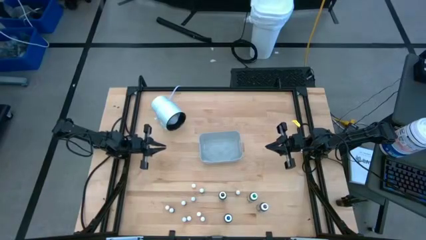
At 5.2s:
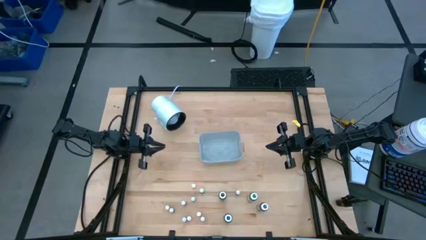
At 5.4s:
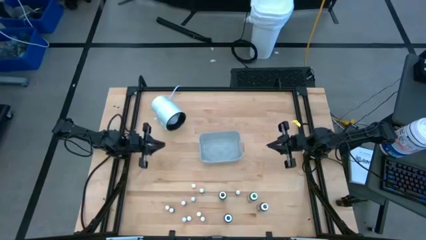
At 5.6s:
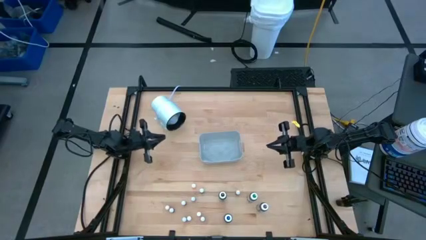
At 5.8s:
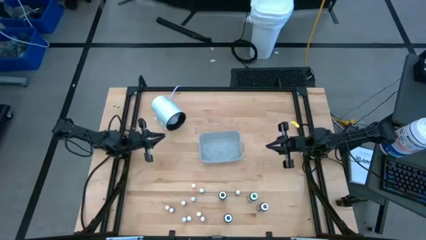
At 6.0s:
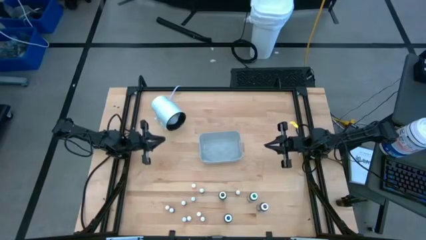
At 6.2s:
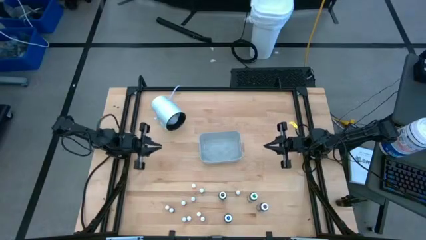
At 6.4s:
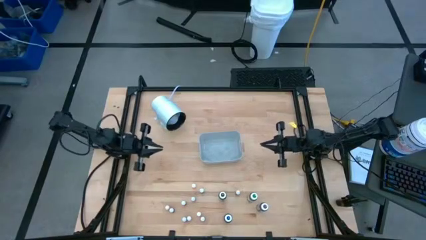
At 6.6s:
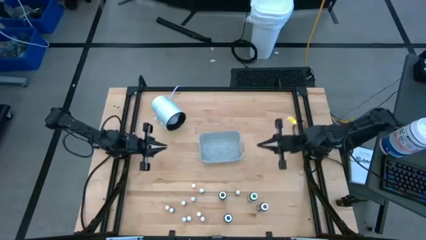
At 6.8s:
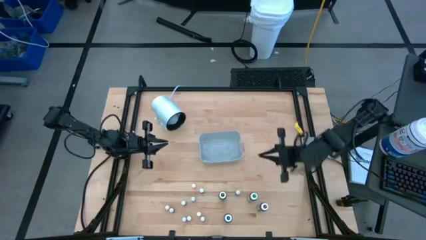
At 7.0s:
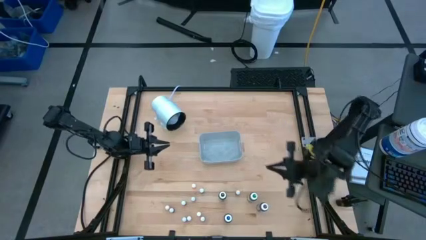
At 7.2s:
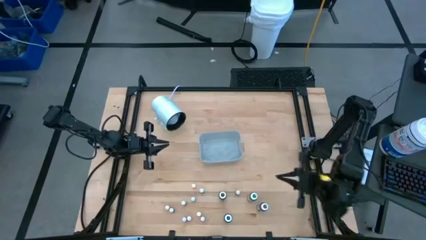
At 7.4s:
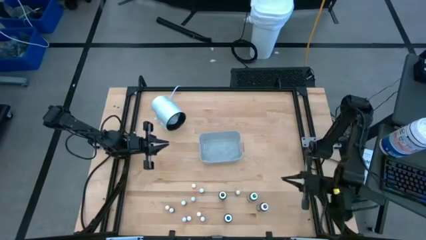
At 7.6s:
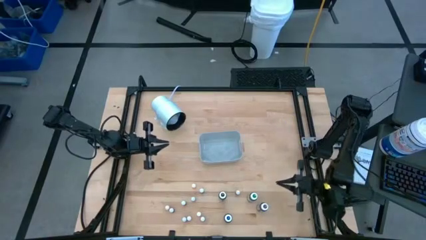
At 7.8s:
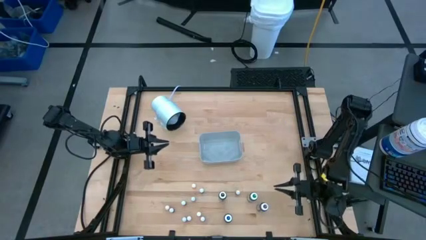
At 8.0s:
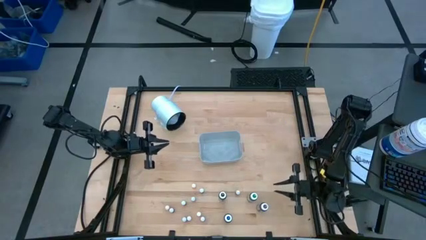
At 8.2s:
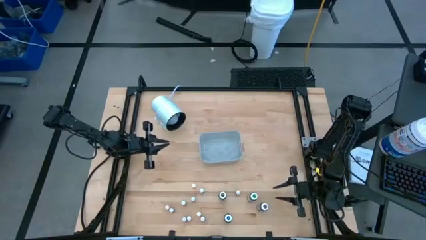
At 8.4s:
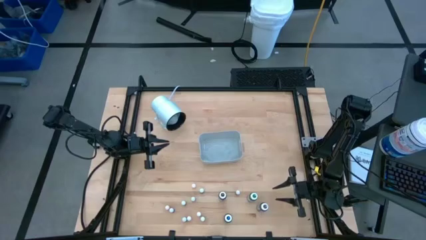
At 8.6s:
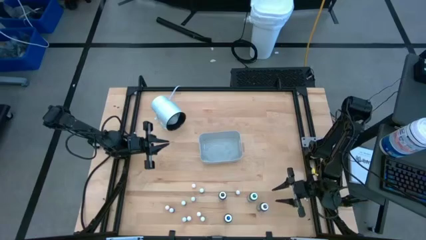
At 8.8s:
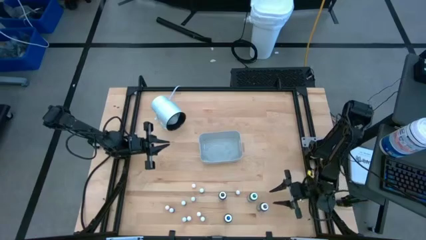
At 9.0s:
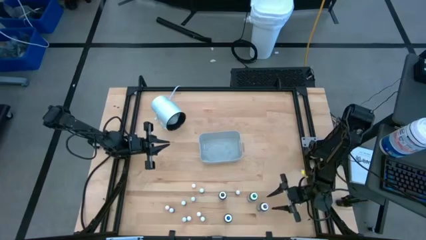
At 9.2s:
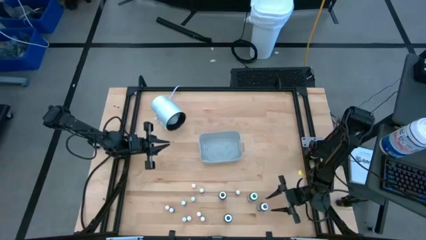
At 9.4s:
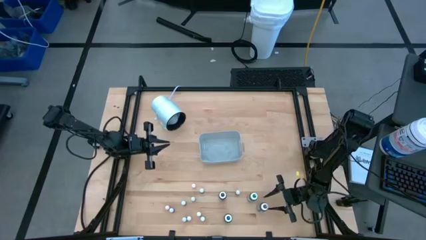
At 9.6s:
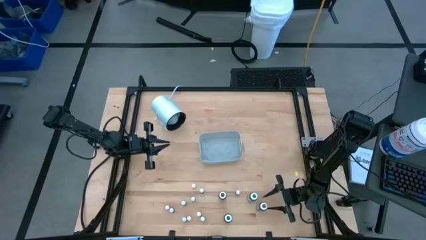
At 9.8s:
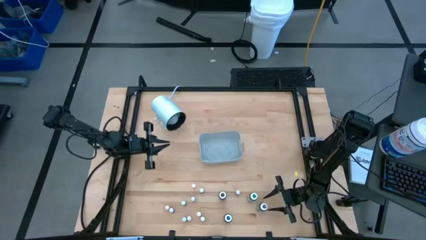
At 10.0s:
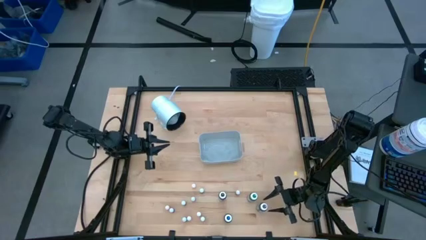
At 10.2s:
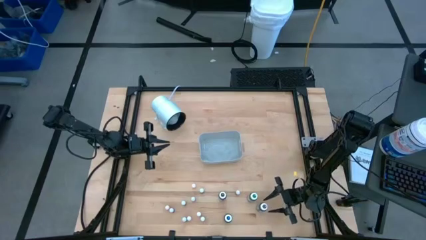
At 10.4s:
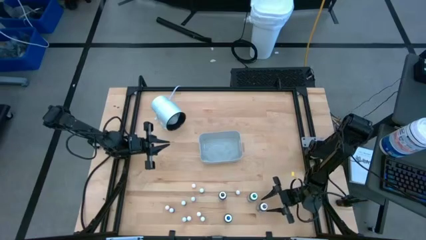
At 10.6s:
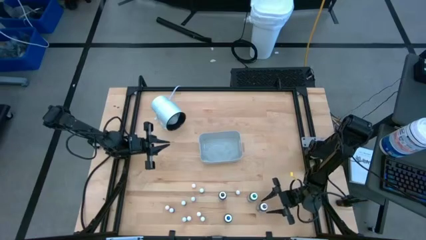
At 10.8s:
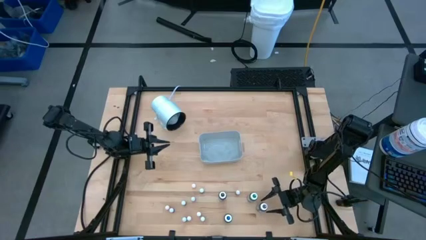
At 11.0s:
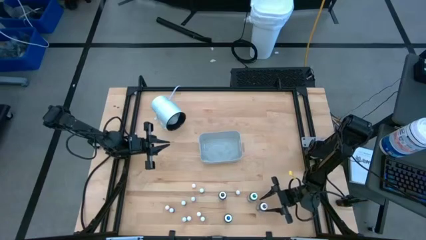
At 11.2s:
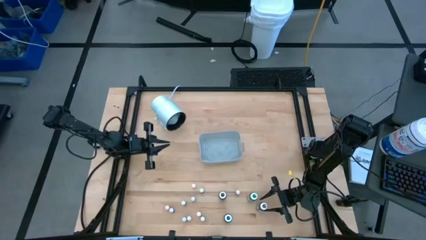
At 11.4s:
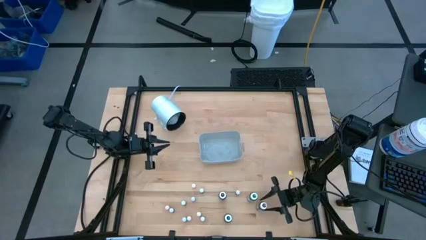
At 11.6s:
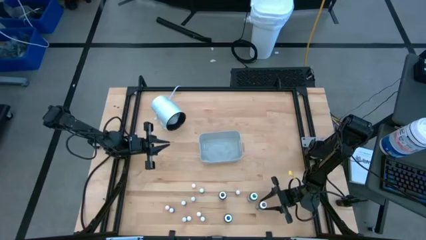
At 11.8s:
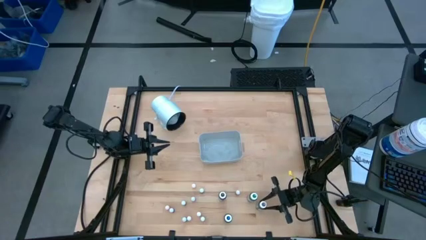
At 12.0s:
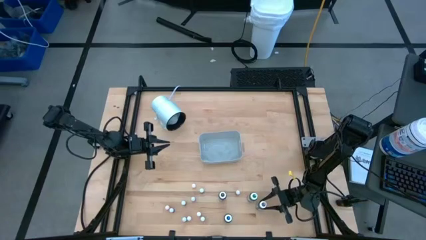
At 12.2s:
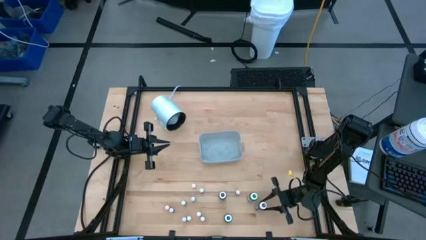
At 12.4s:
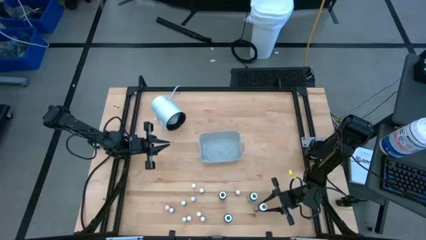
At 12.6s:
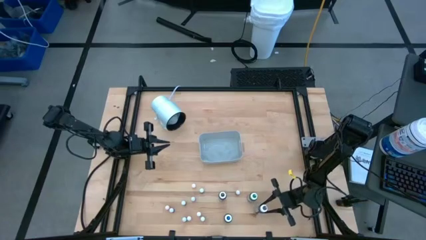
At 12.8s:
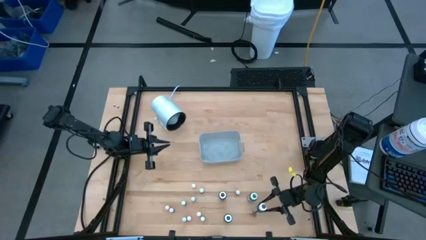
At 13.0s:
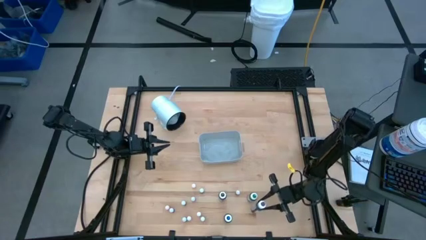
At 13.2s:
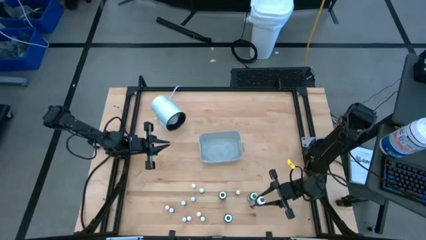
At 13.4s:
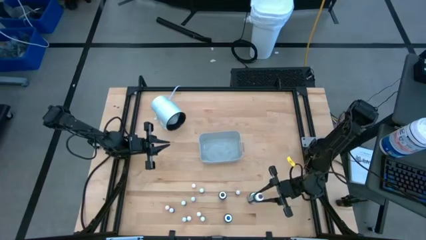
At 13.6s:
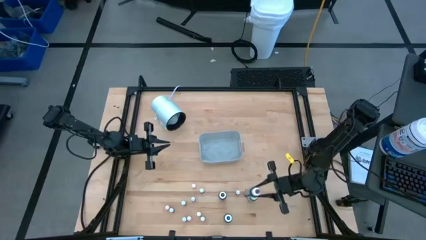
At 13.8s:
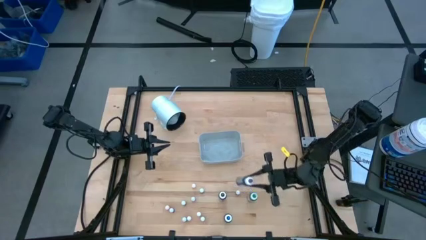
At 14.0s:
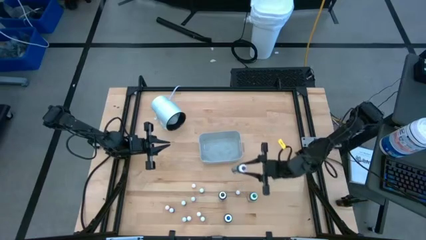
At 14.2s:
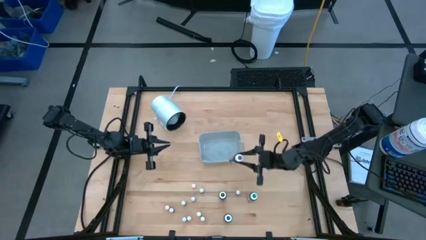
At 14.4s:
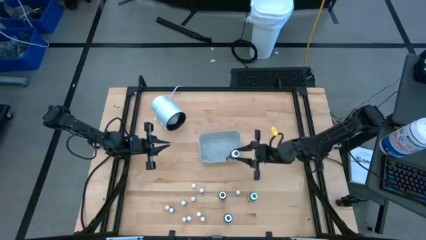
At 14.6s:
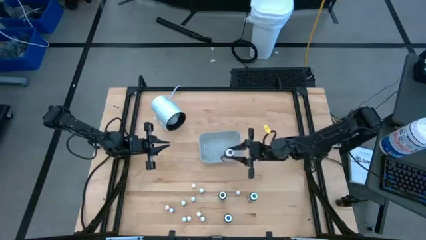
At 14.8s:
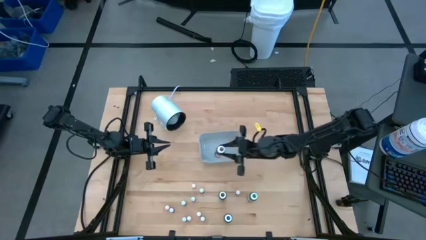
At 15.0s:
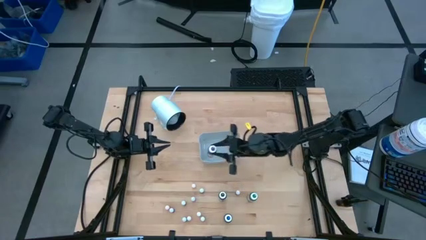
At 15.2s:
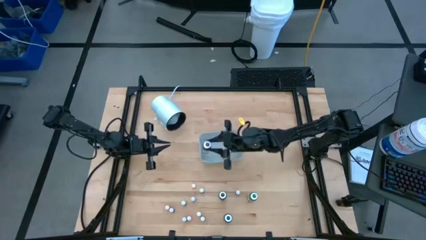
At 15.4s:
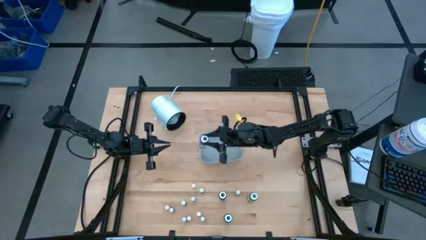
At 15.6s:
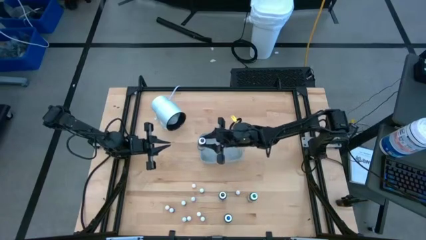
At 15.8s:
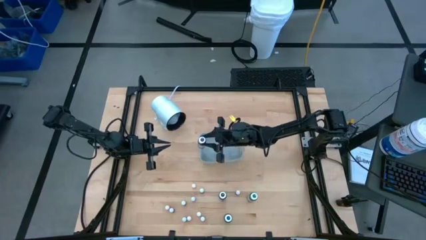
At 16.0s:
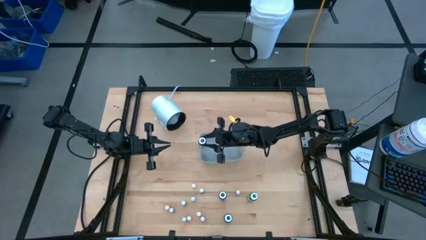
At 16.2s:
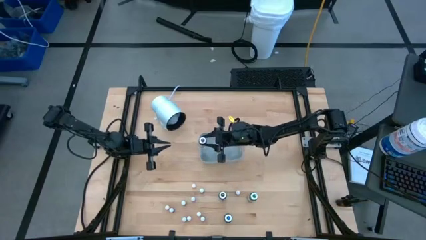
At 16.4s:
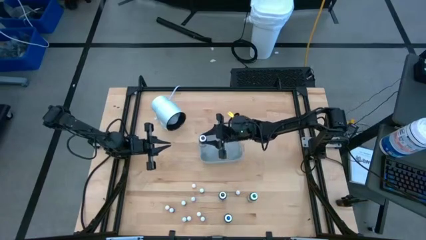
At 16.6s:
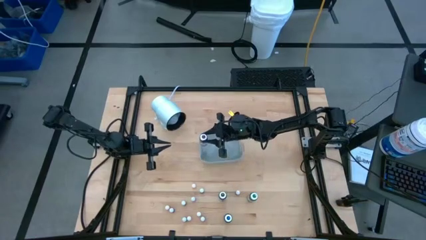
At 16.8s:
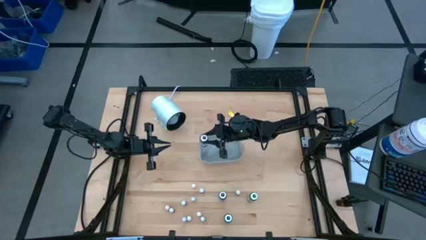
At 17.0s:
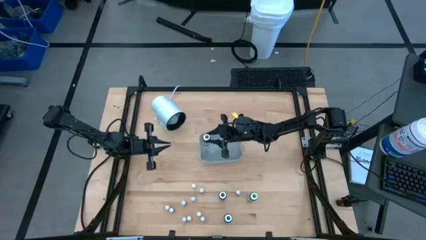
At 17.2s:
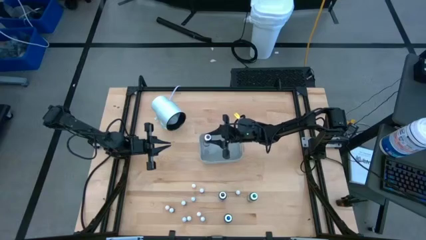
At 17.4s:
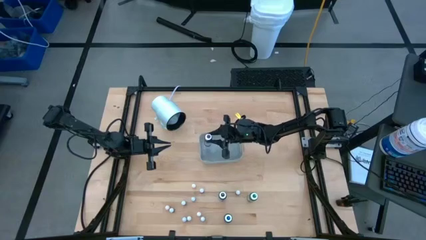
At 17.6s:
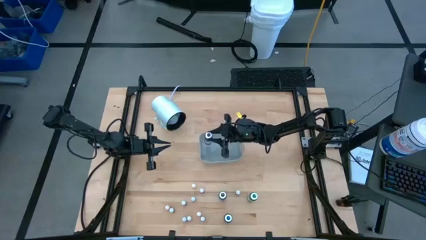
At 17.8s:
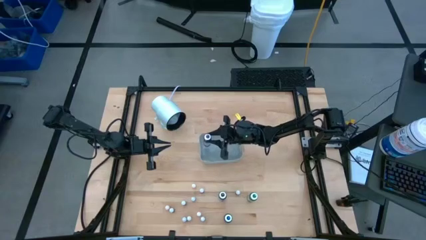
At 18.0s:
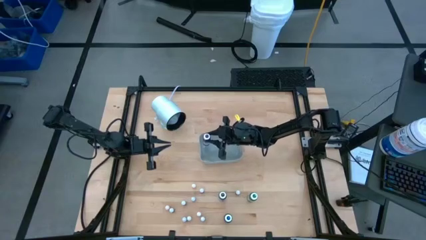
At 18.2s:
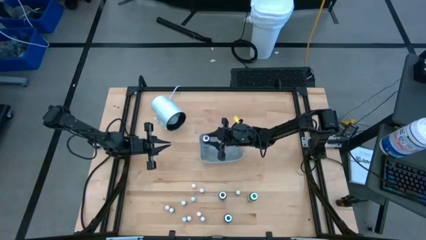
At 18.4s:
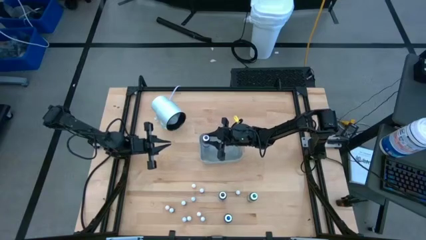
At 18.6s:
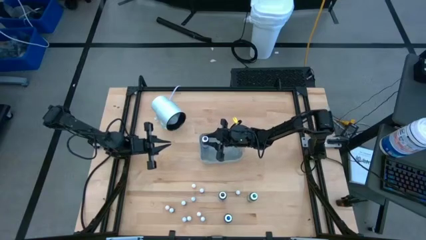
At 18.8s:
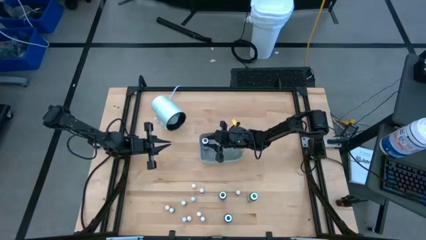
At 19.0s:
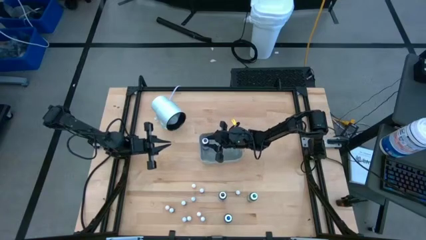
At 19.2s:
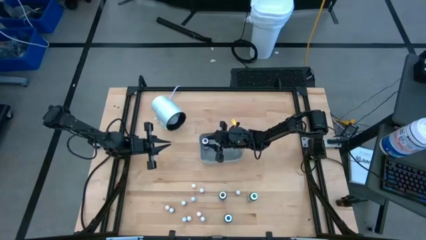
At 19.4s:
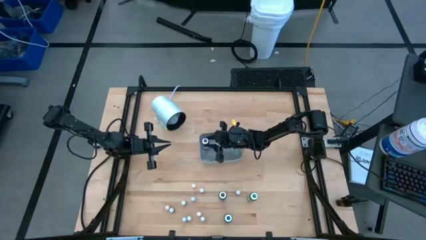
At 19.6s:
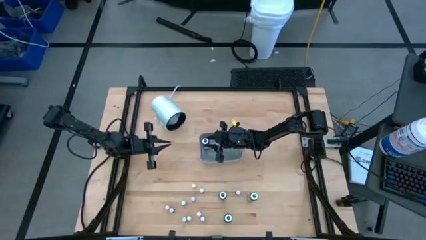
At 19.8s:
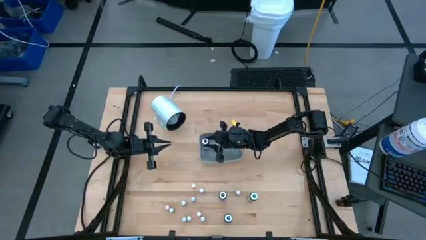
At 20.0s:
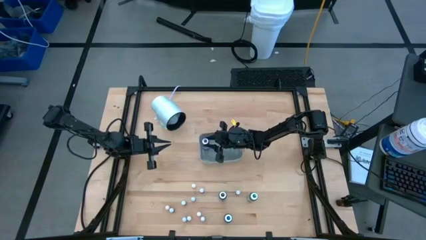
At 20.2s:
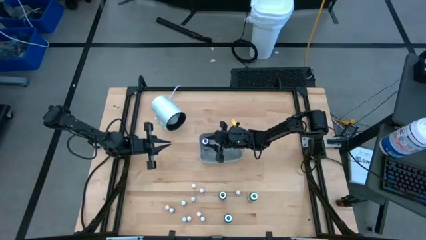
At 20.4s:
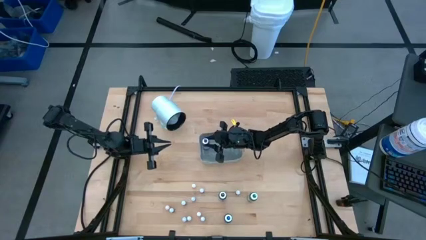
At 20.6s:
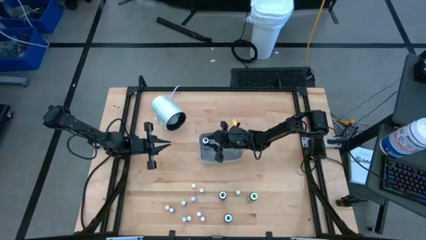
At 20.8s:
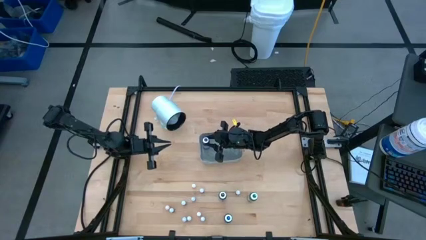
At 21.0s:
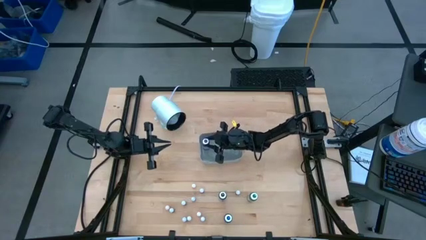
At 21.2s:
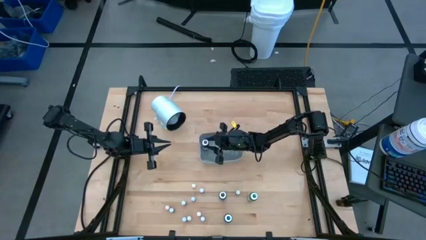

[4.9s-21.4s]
Task: Pick & Place food coloring
Put the big violet food coloring bottle into the gray bin
